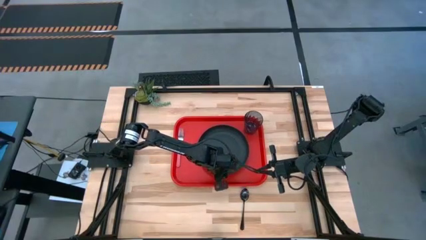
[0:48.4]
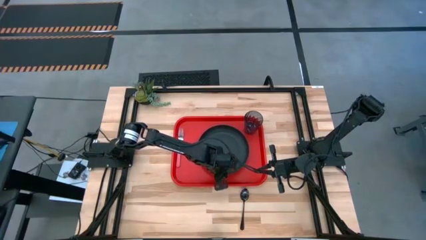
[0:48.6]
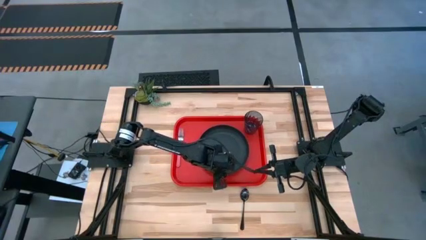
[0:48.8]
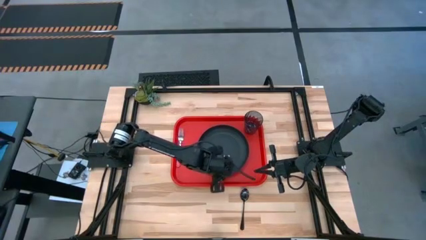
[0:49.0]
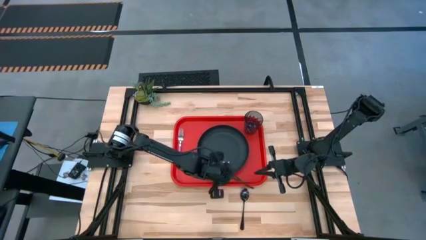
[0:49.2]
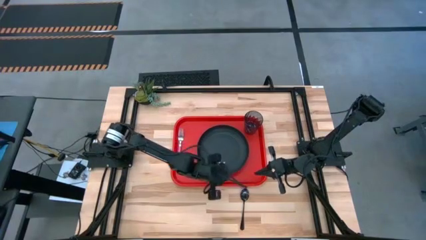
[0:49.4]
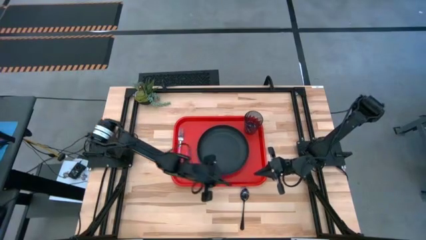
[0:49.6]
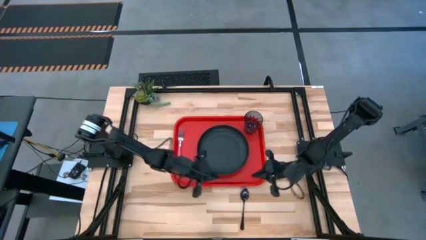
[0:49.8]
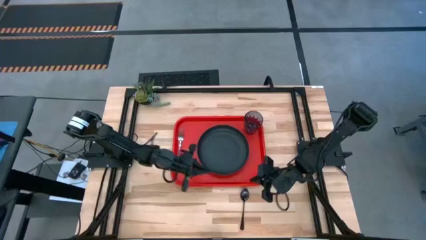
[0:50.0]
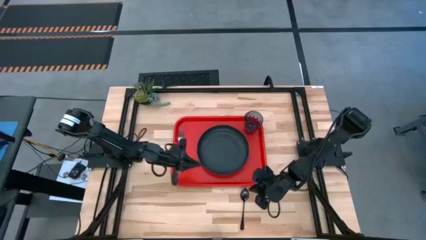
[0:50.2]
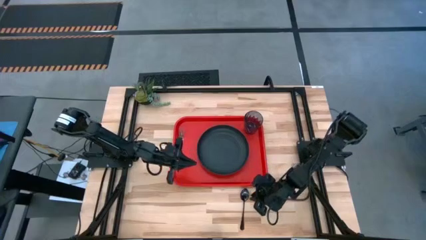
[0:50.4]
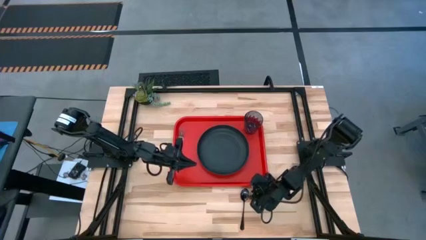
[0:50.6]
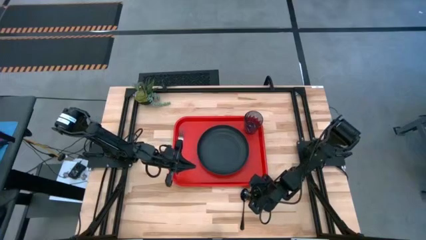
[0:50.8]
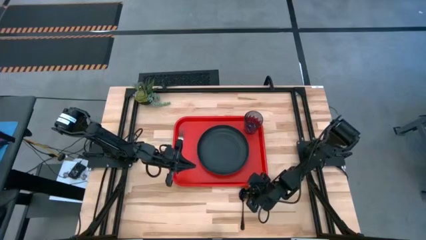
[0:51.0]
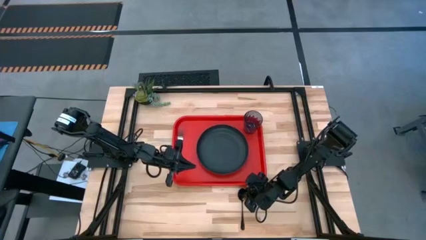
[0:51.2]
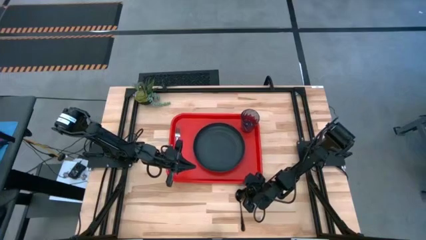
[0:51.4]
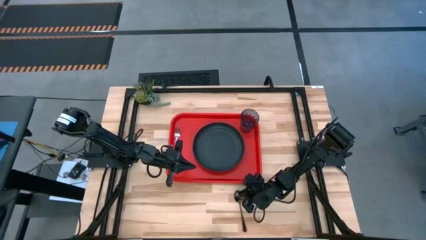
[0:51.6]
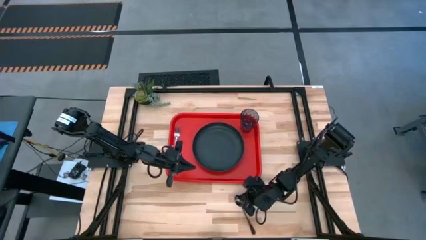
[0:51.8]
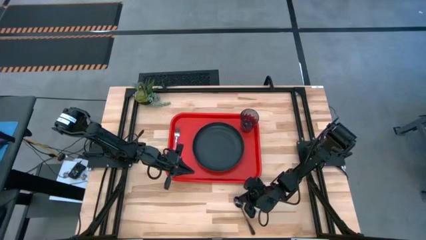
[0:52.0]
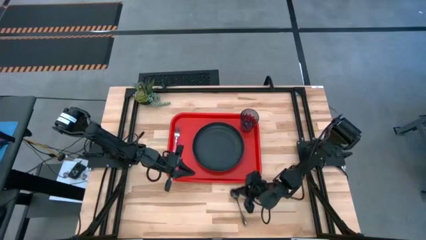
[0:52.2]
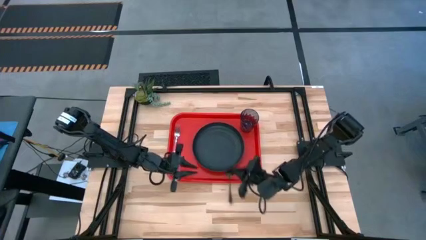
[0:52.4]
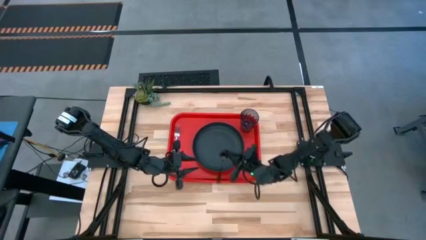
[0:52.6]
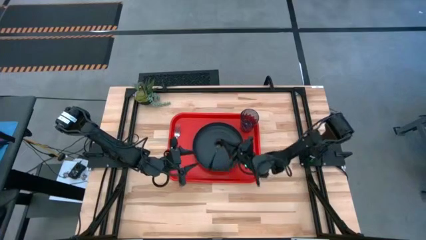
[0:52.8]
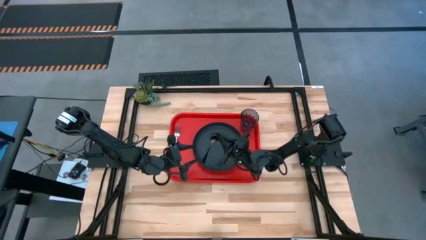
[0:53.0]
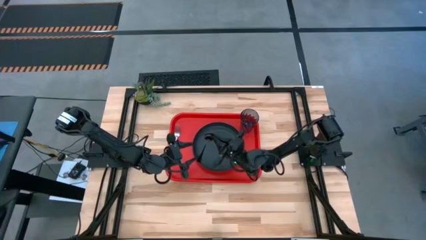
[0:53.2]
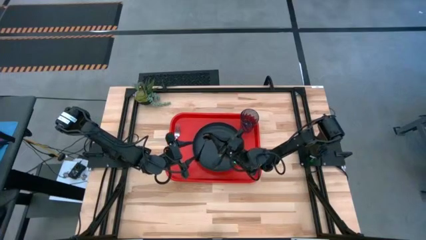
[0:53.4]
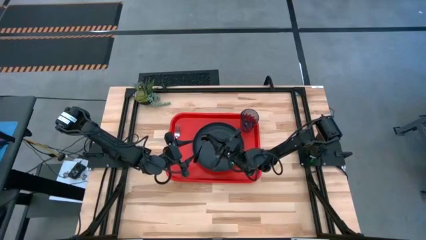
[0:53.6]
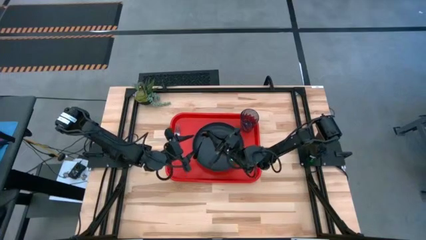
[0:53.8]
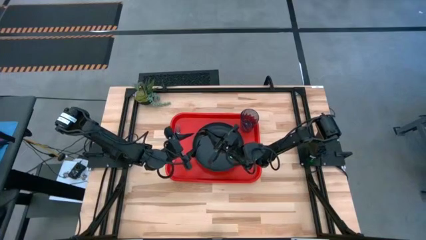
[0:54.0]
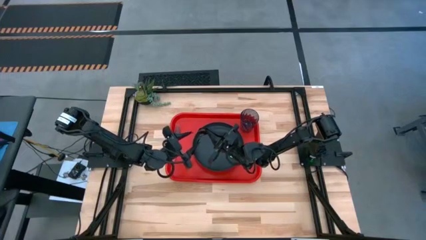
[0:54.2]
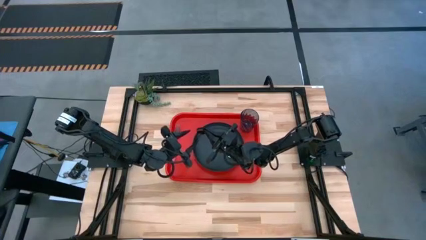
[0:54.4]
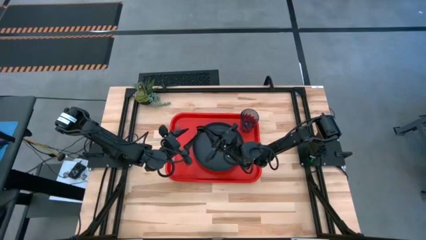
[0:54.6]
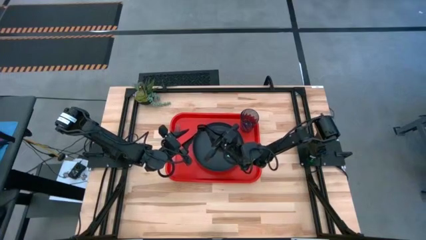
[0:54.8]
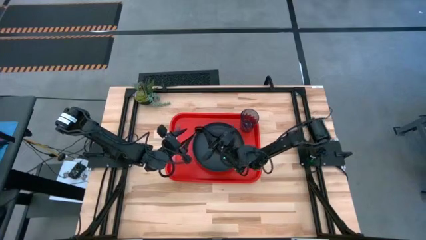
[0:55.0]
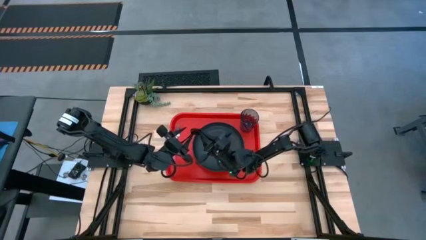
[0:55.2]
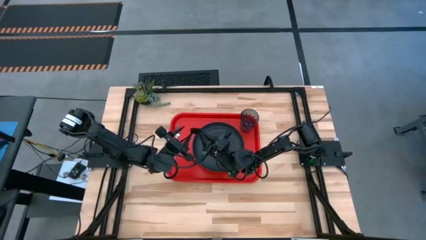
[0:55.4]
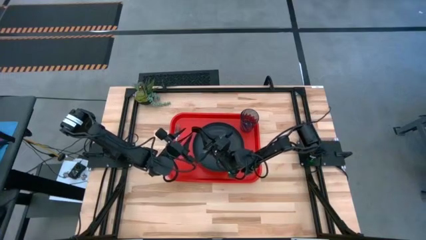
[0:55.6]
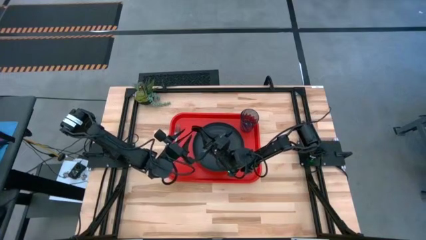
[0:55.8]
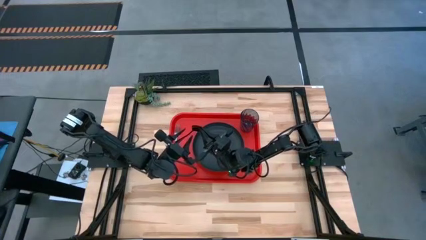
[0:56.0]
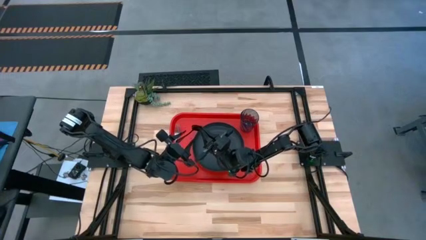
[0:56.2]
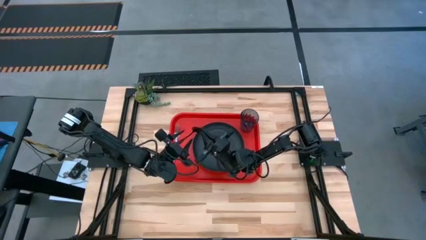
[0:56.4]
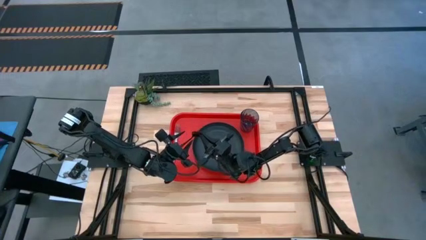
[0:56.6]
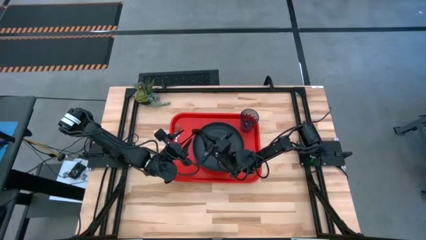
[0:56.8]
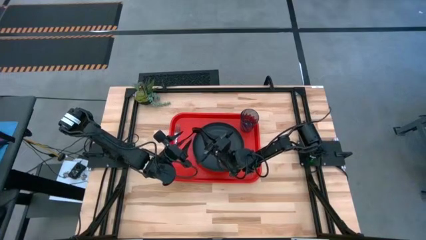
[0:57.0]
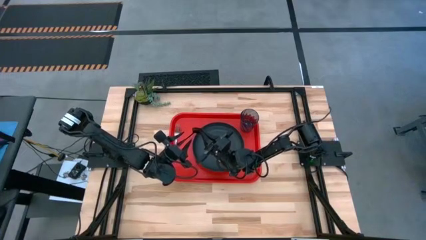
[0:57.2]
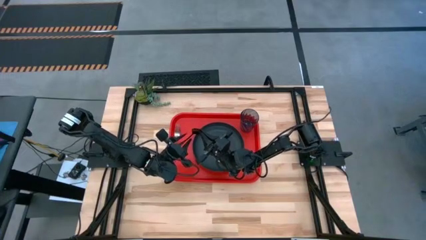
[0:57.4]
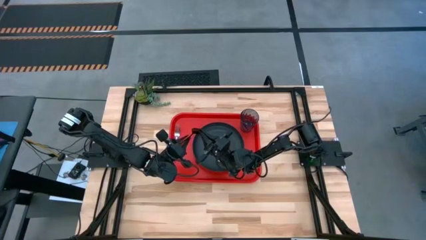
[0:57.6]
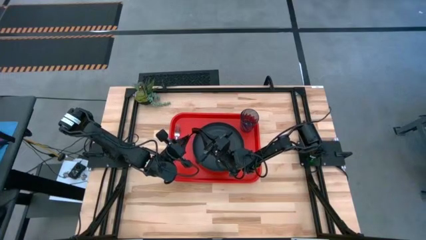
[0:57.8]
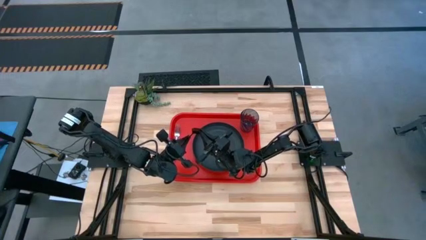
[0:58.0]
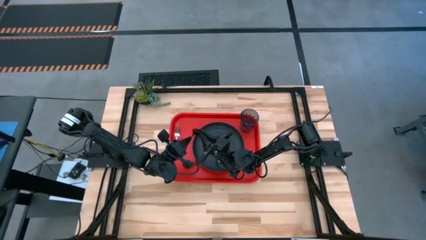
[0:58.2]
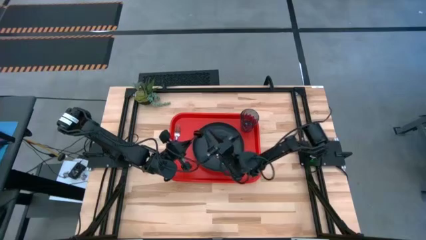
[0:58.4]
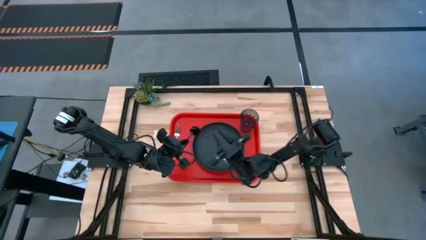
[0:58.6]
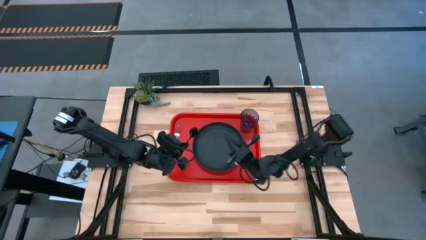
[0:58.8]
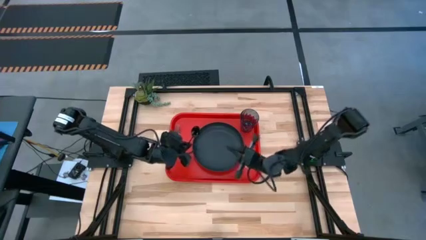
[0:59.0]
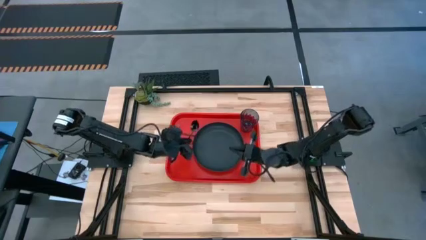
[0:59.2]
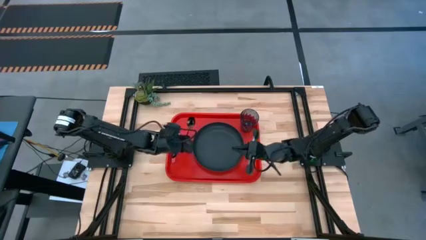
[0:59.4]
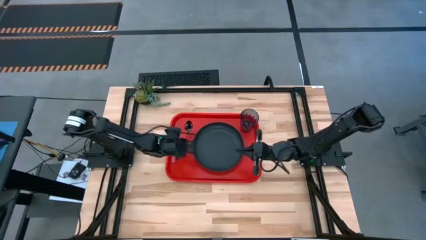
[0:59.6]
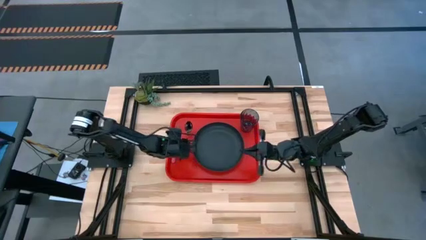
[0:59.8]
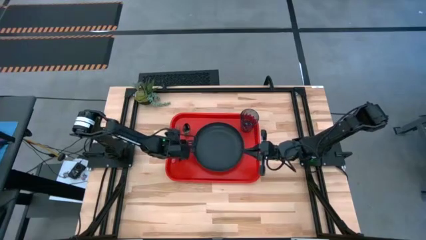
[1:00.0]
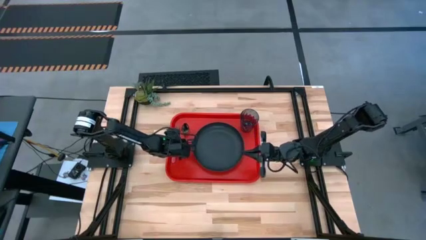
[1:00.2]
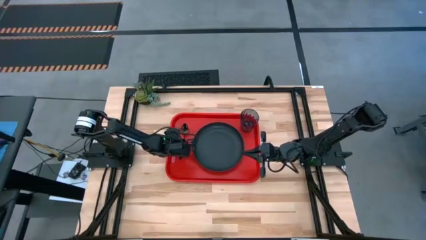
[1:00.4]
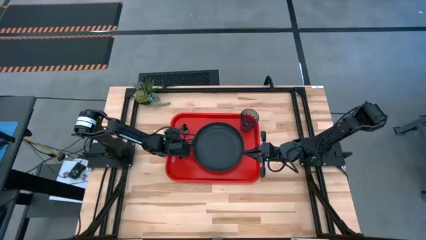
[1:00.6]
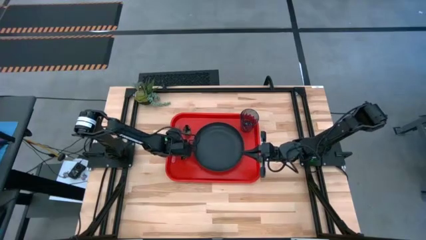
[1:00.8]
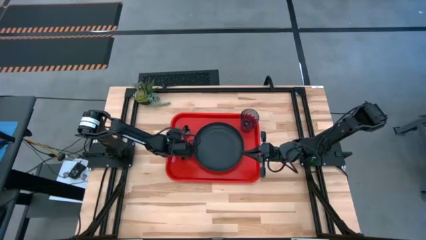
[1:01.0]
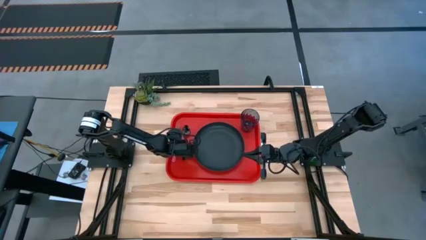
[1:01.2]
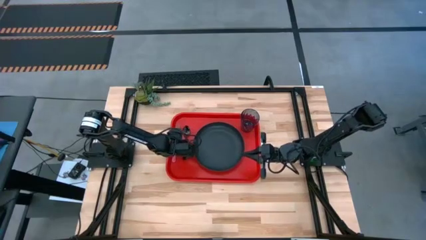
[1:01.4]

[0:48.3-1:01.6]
Task: Pick and place plate/cup/fork/spoon on tray
Put the black spoon in between the black plate and the pink fork on the red tray

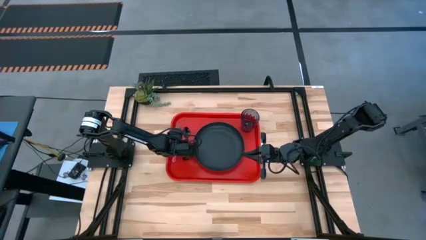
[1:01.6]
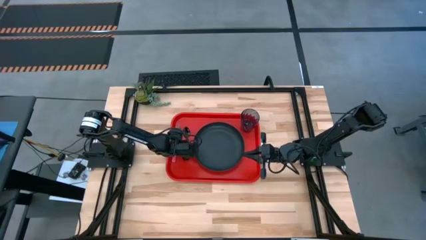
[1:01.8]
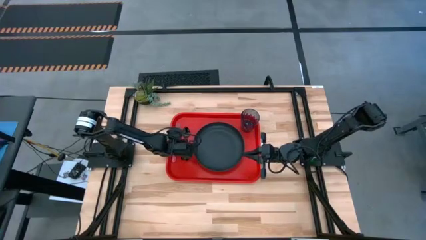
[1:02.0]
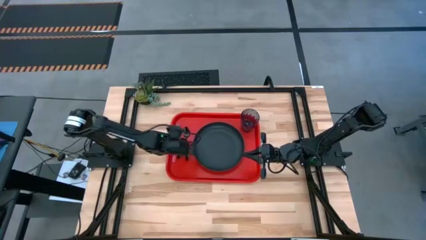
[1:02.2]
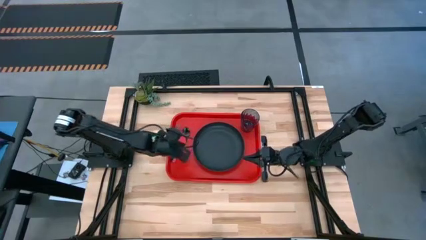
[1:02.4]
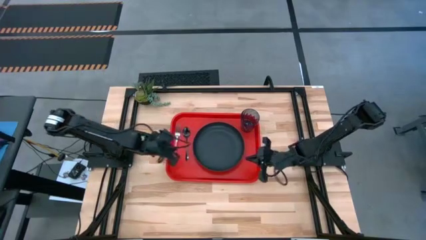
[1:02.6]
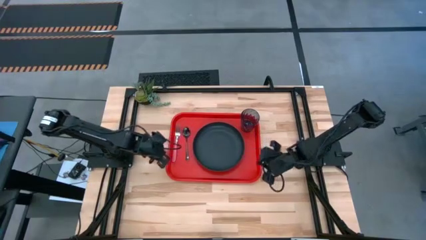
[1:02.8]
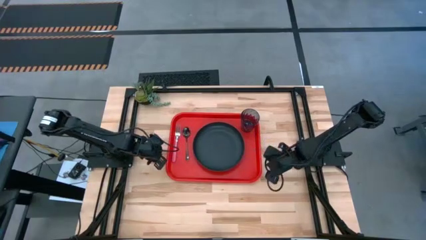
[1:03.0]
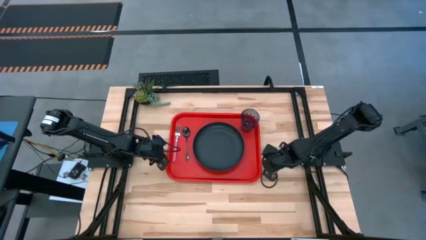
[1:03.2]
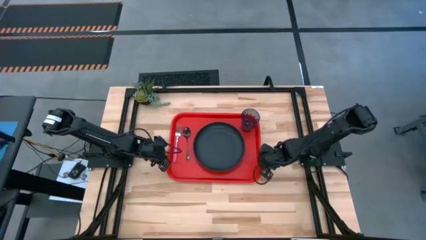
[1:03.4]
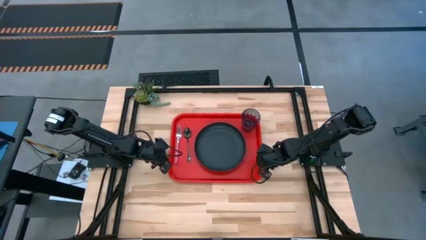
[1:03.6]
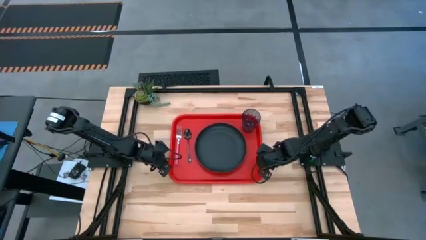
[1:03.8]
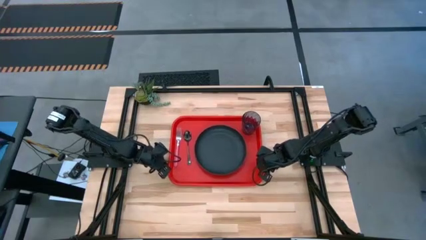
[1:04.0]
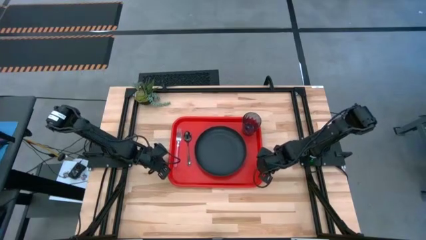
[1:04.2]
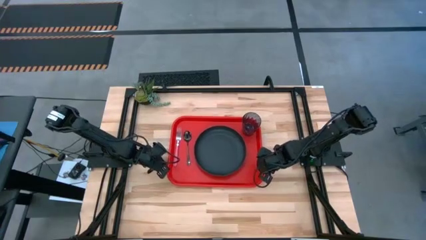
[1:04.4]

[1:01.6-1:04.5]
Adjust the red tray
